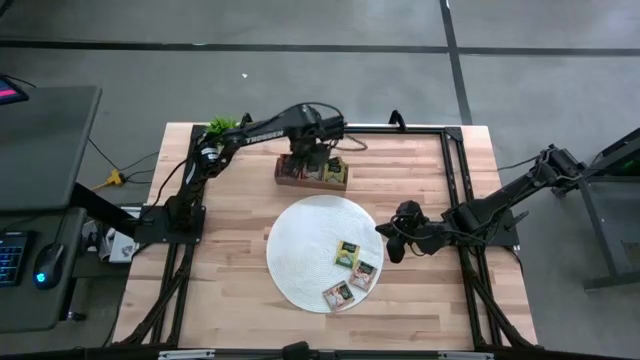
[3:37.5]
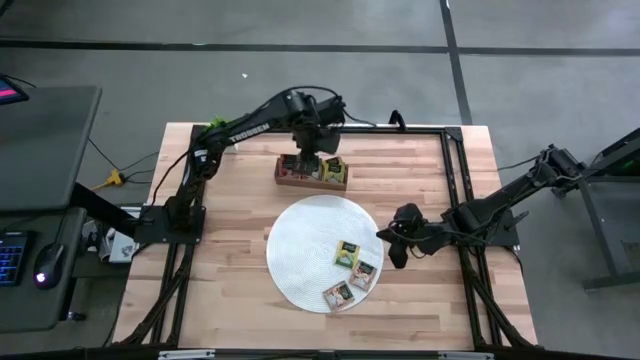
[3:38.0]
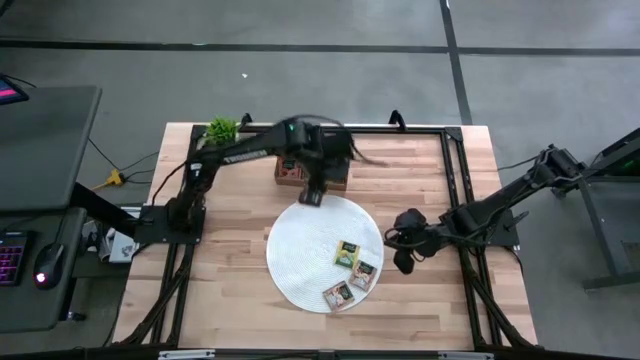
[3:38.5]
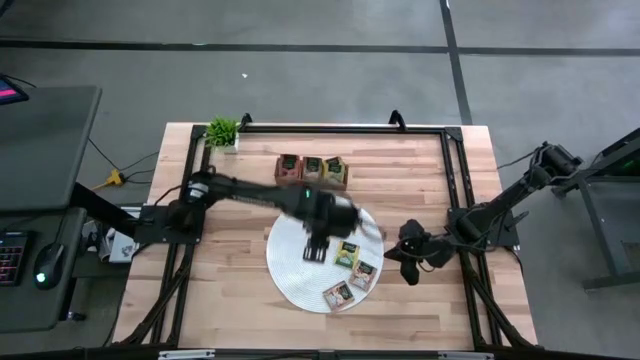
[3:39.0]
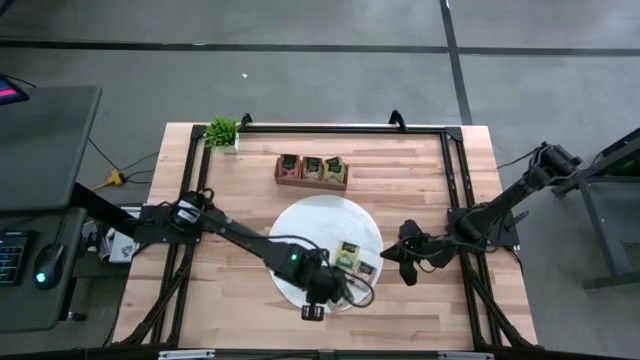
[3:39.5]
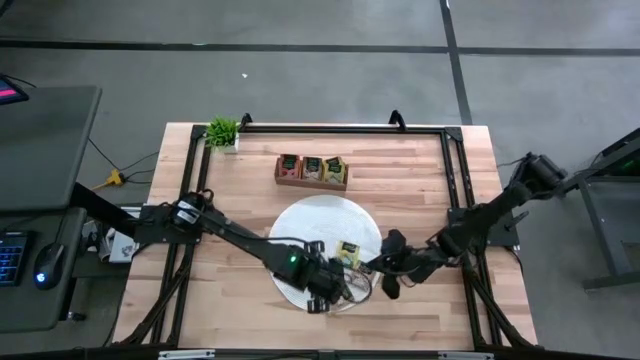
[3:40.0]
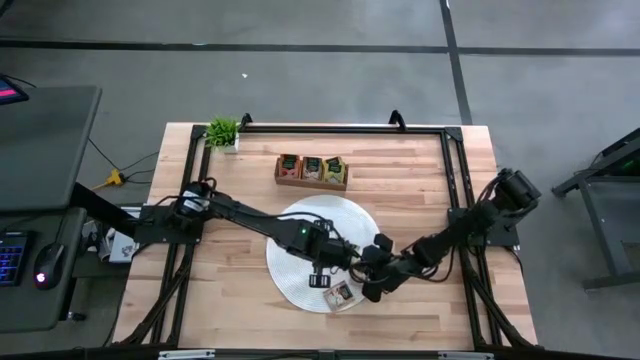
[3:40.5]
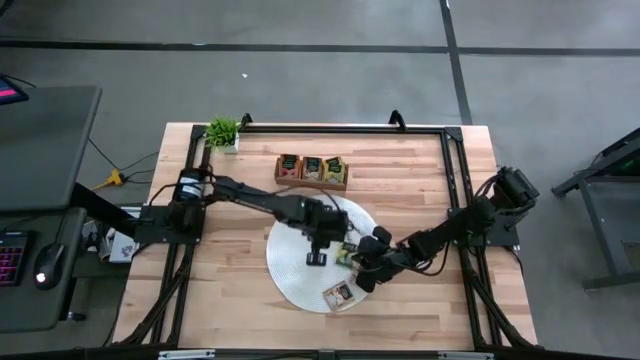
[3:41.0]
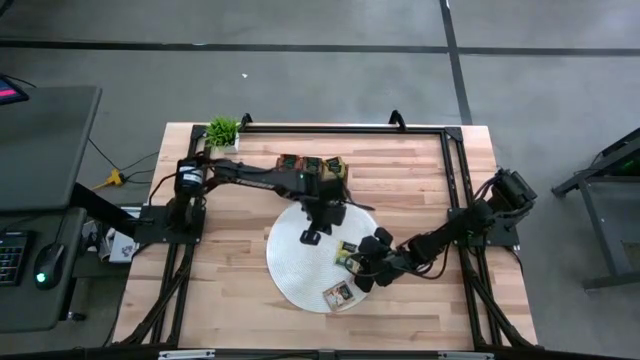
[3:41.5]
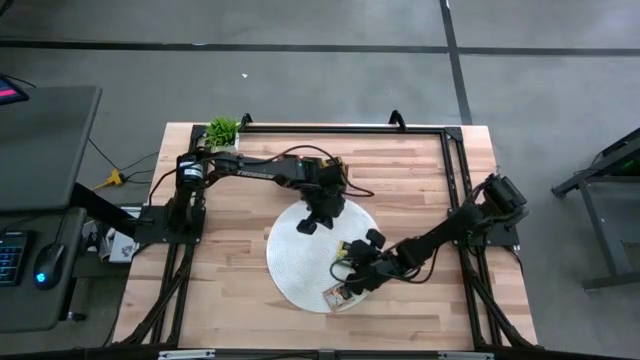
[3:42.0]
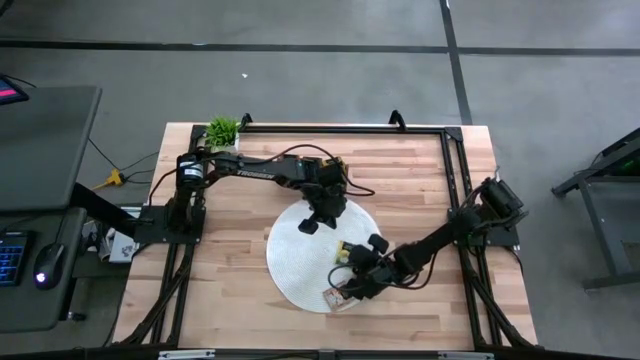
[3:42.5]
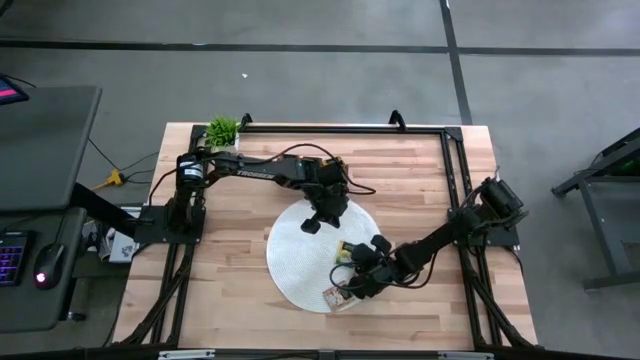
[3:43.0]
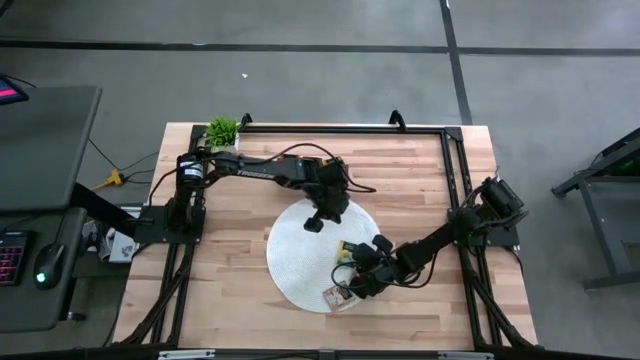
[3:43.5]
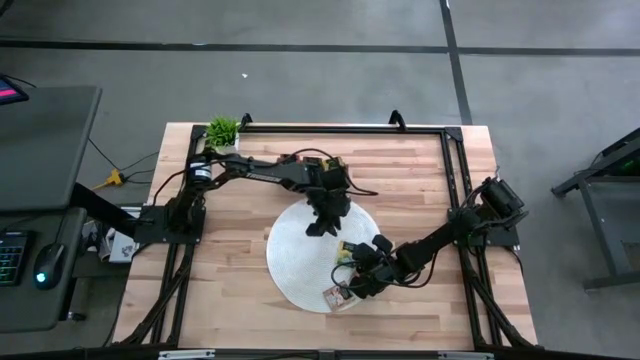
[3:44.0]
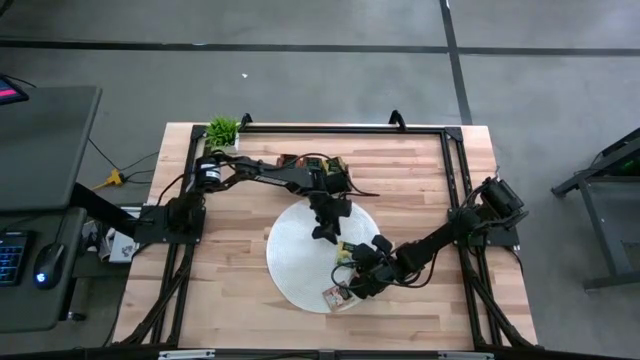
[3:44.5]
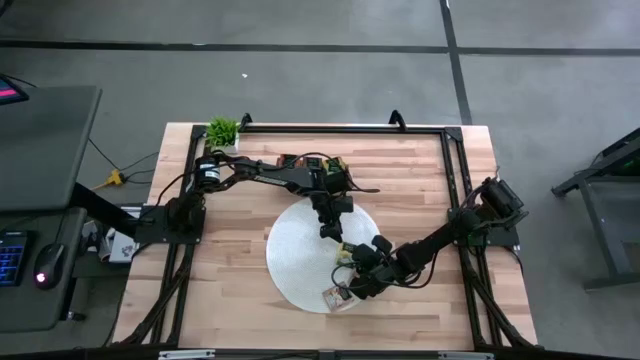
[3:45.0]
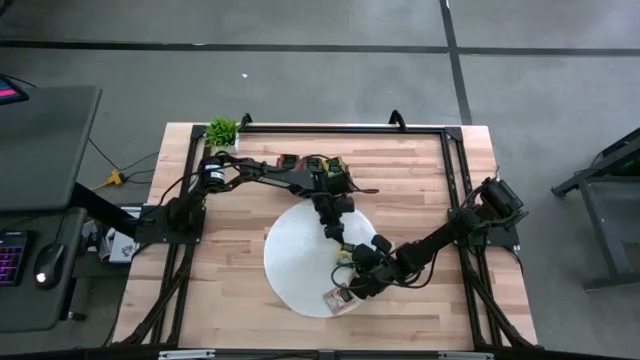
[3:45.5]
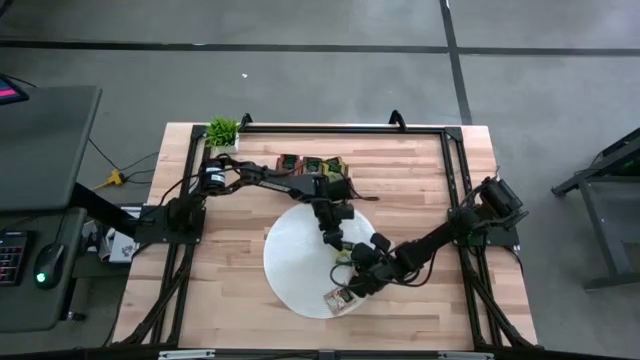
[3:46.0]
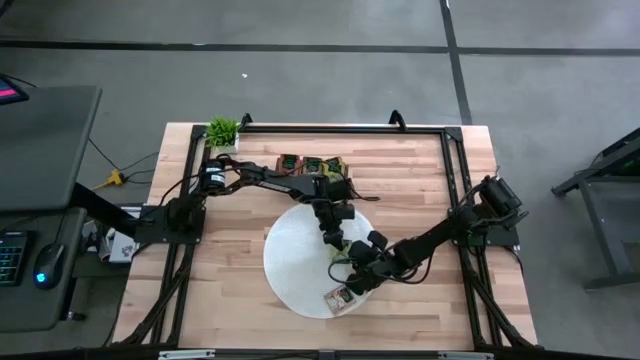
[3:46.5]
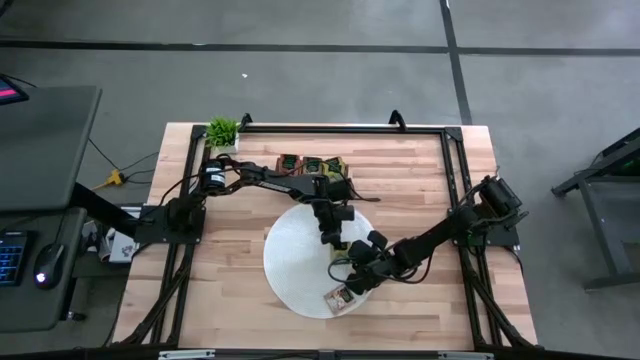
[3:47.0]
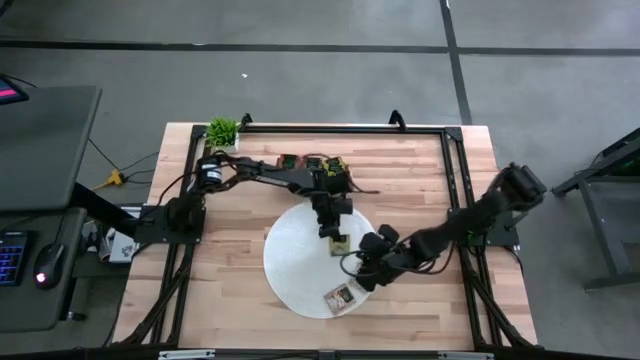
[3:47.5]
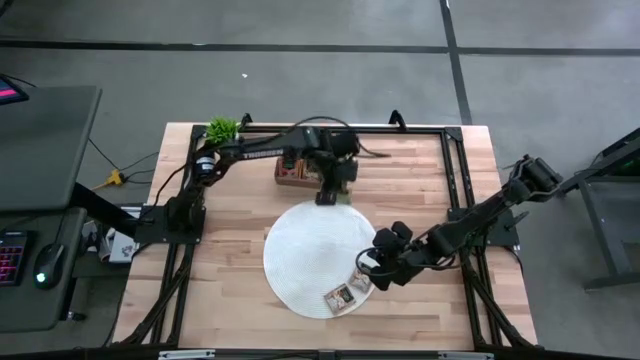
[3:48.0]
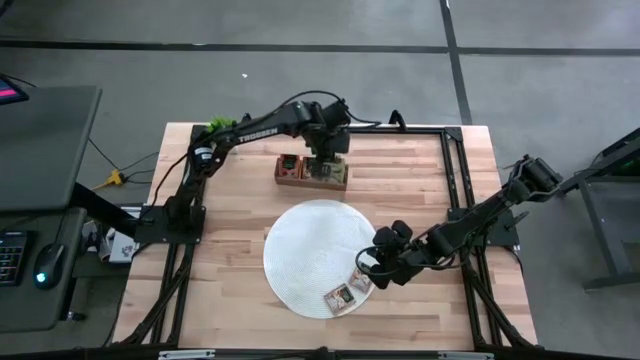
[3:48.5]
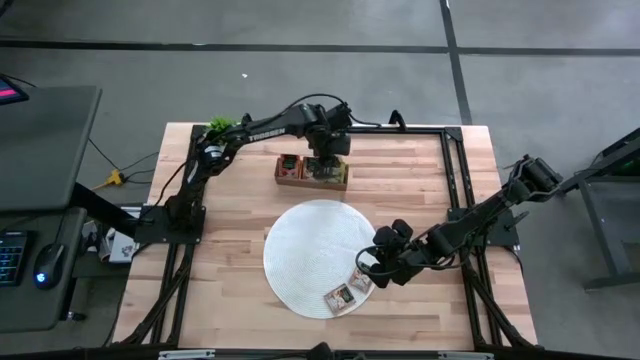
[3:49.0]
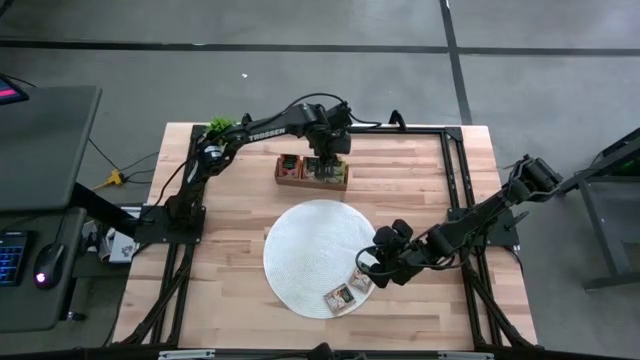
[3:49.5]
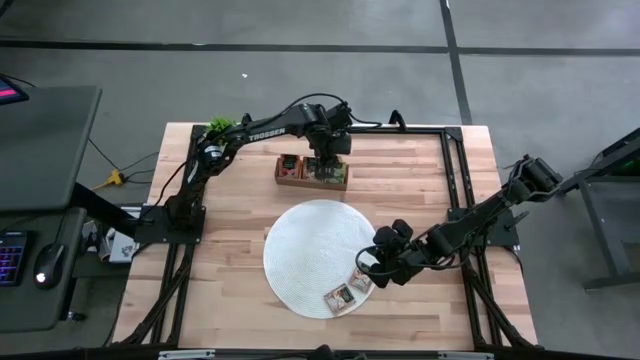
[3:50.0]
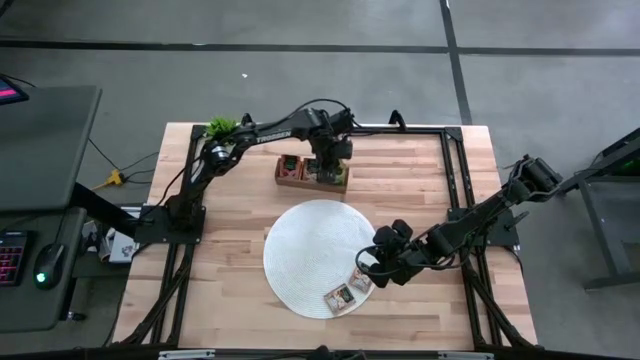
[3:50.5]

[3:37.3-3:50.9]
Task: Pick & Place Tea
Put the yellow tea bag into the right section of the wooden organizer

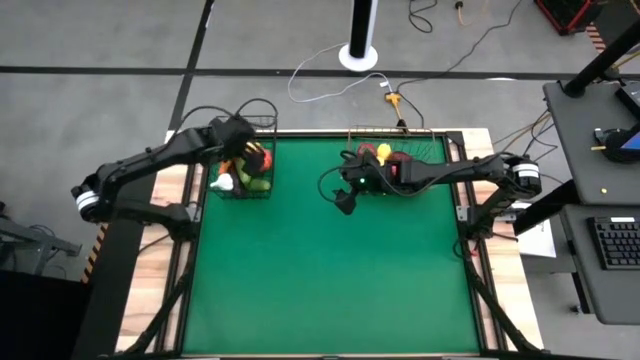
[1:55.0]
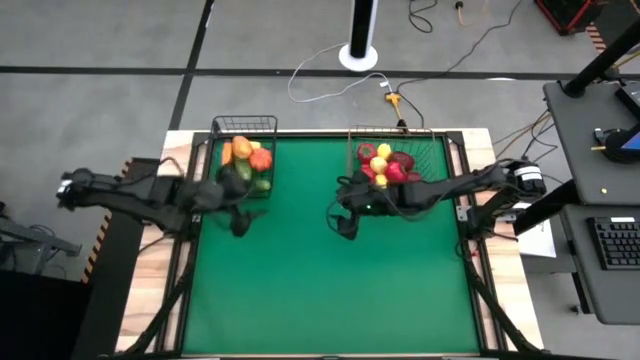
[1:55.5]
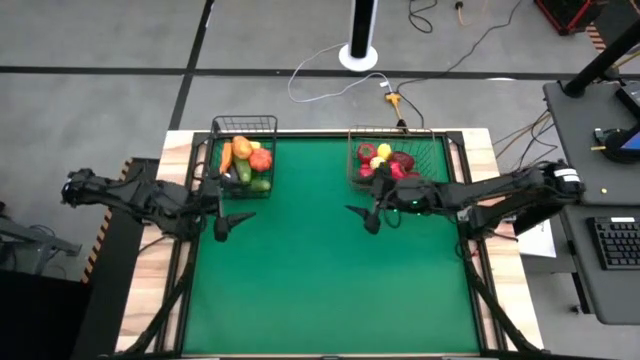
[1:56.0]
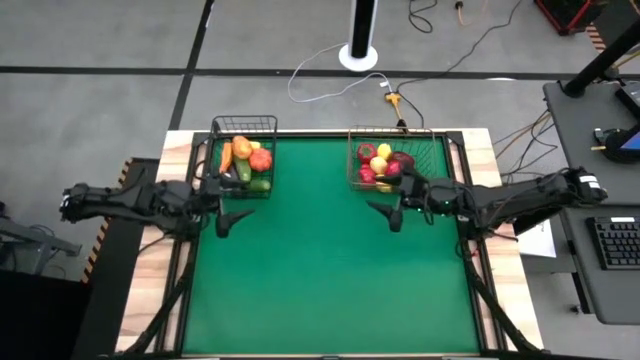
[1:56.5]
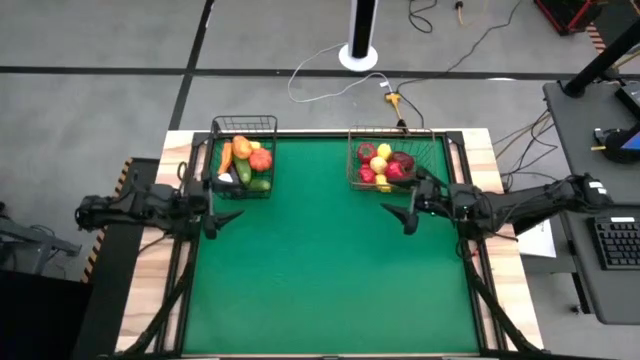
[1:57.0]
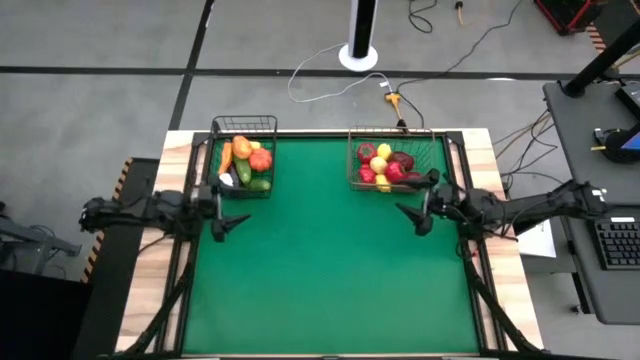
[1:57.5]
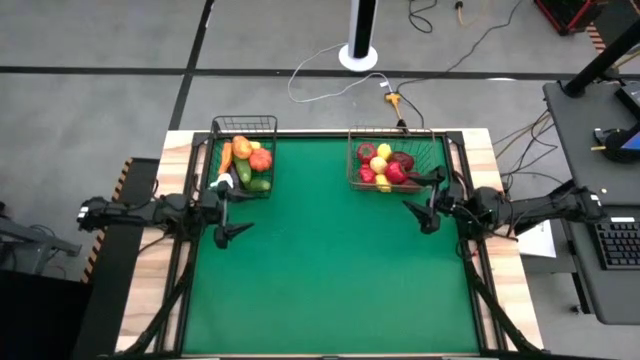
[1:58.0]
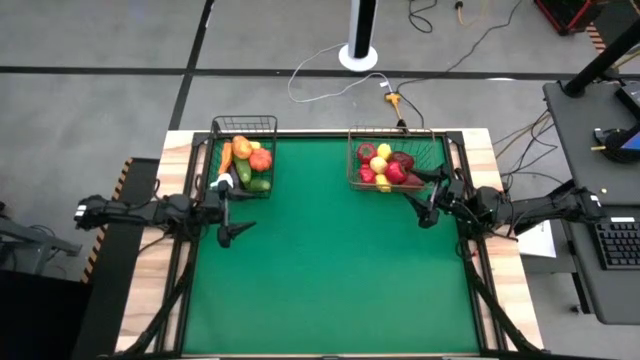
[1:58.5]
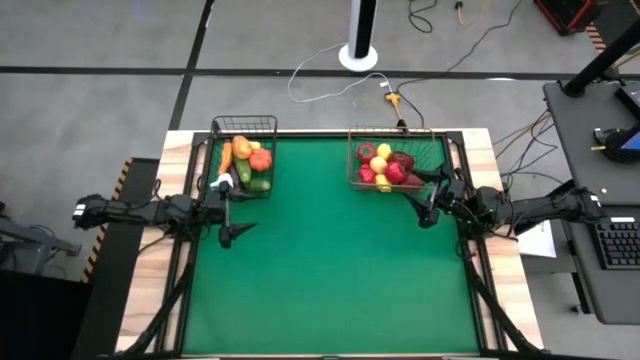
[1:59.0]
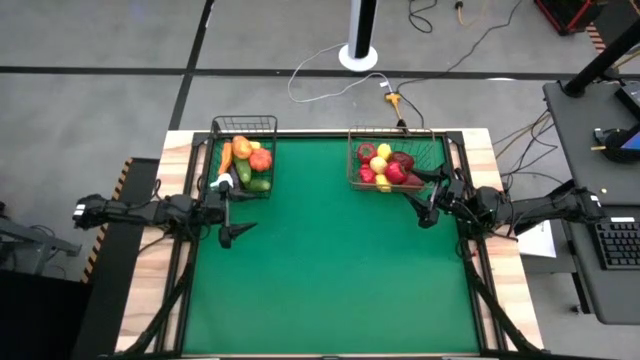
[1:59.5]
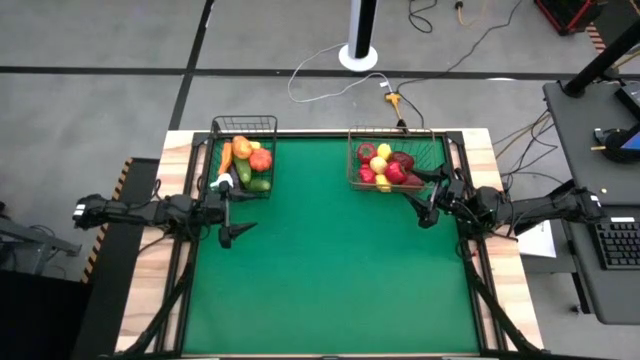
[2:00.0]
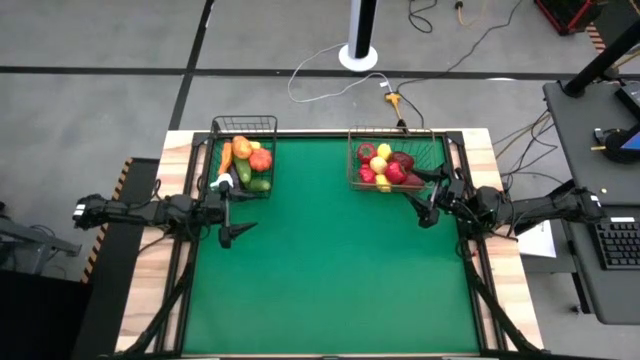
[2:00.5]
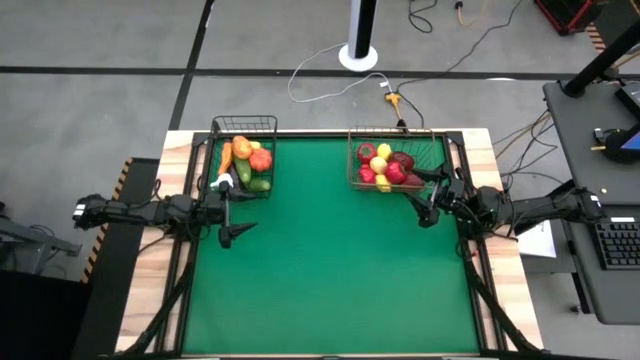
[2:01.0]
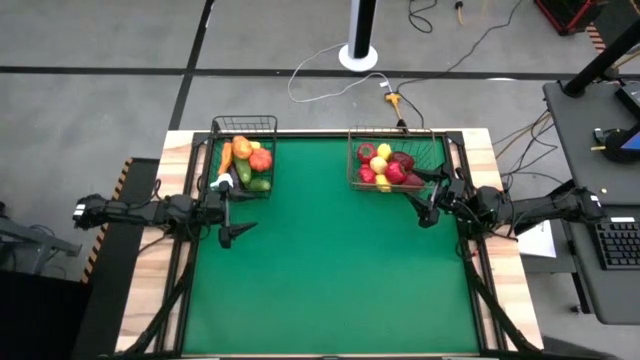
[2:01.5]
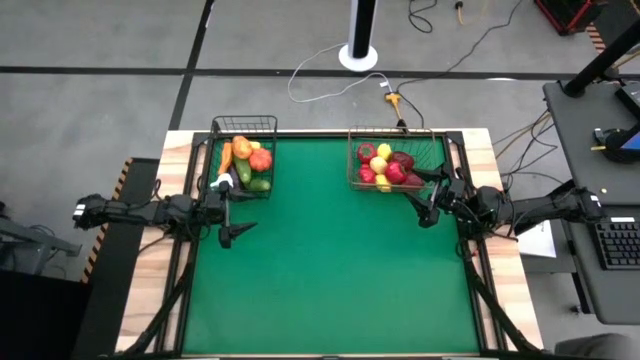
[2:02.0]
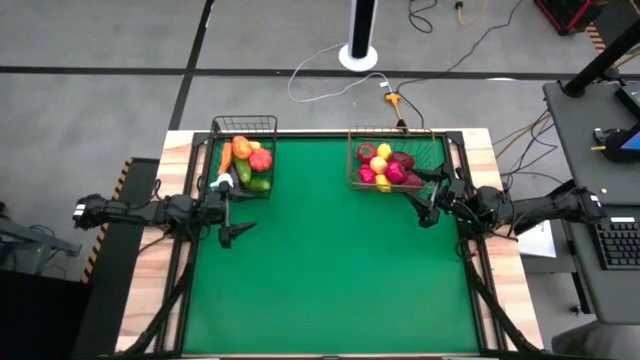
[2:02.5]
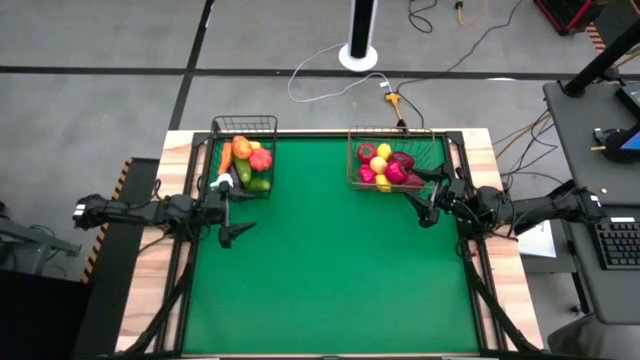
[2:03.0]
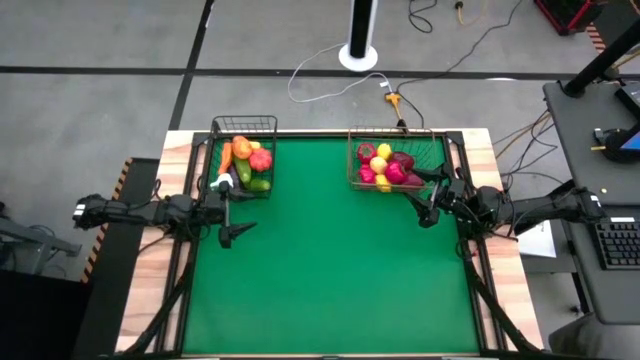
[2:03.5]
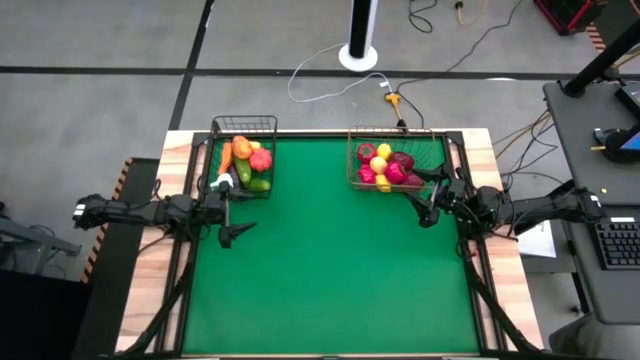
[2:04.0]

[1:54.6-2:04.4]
Task: Sort produce into baskets
Return to Home Position
